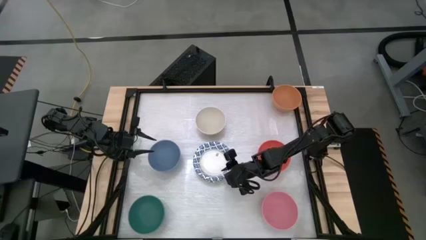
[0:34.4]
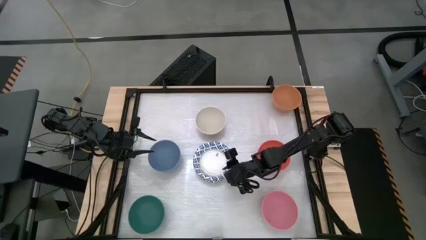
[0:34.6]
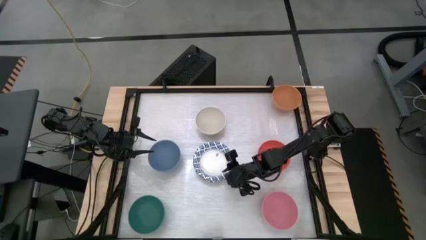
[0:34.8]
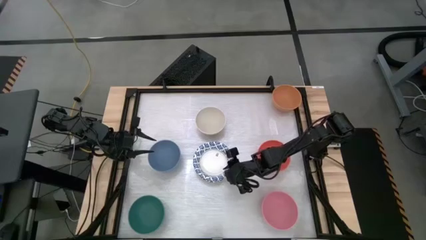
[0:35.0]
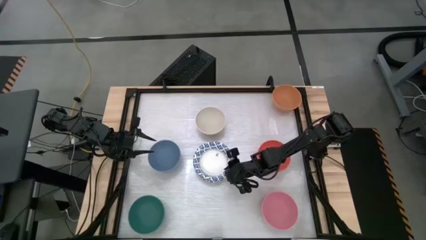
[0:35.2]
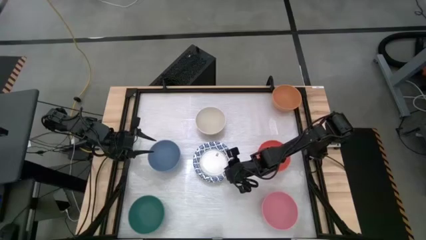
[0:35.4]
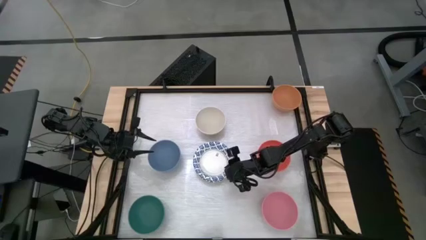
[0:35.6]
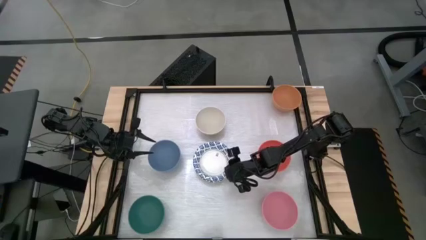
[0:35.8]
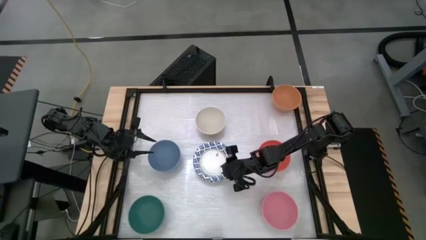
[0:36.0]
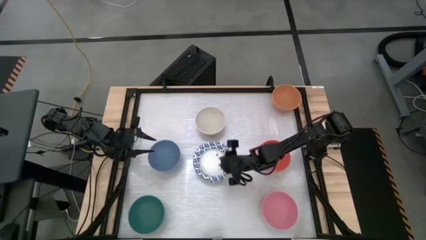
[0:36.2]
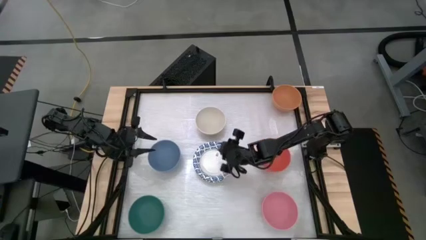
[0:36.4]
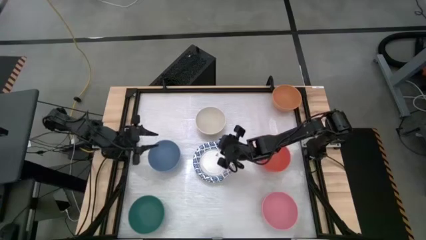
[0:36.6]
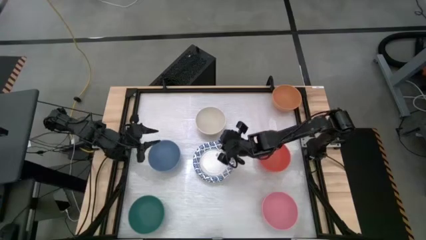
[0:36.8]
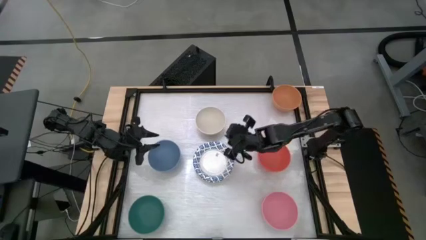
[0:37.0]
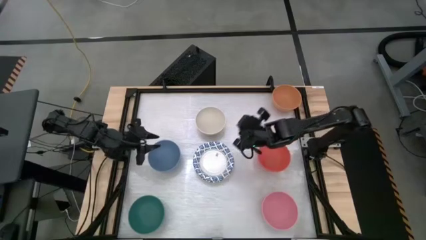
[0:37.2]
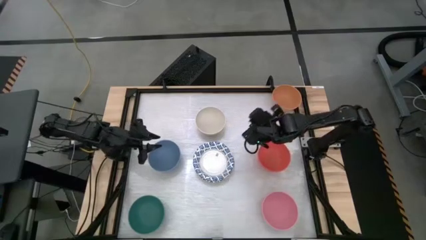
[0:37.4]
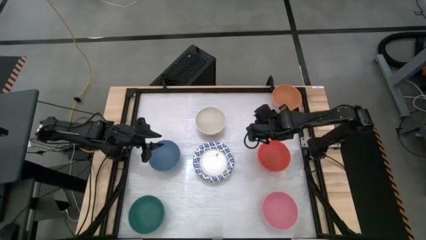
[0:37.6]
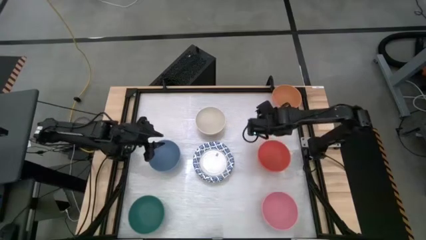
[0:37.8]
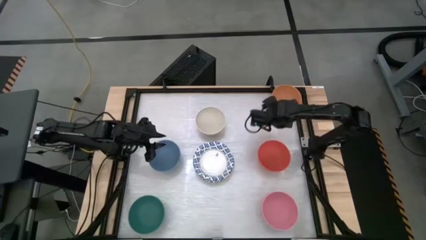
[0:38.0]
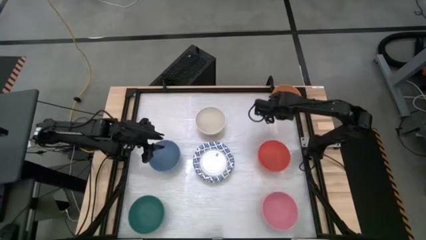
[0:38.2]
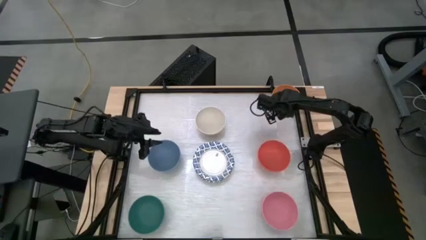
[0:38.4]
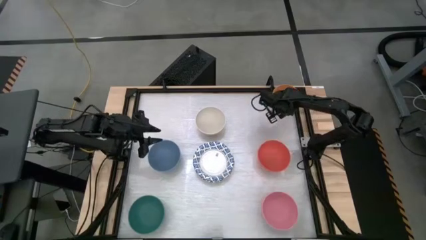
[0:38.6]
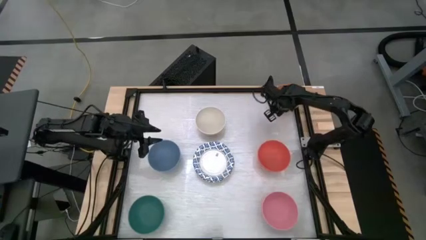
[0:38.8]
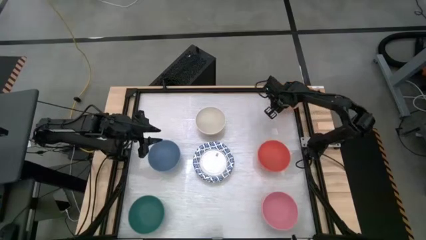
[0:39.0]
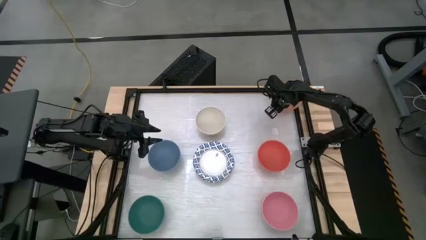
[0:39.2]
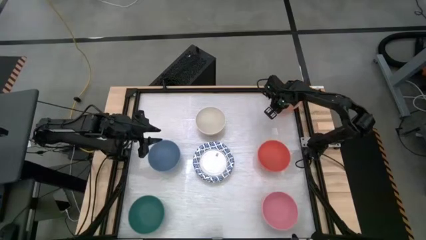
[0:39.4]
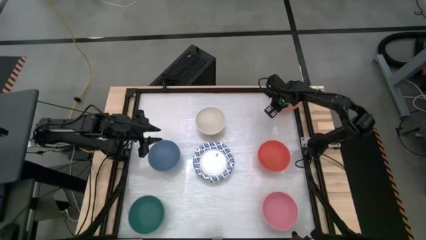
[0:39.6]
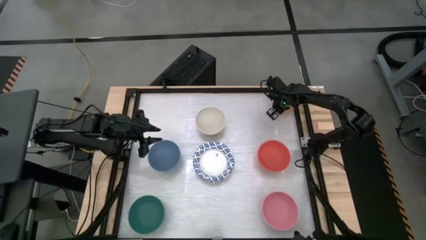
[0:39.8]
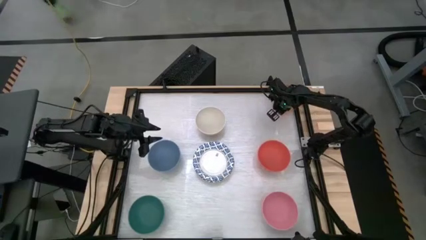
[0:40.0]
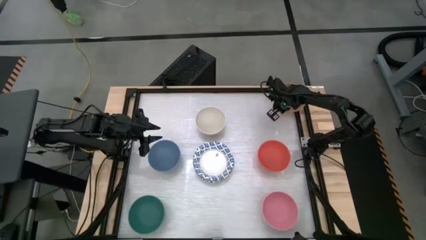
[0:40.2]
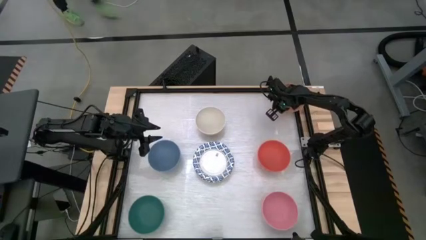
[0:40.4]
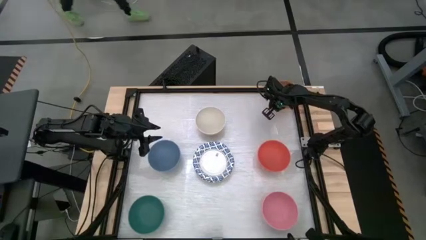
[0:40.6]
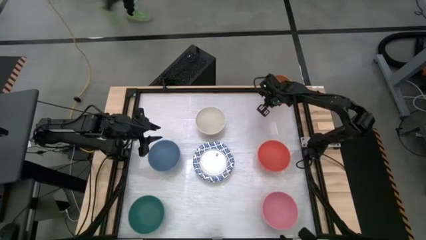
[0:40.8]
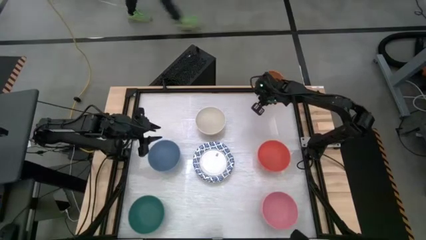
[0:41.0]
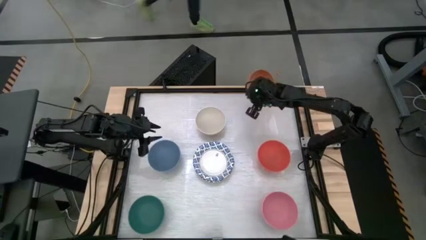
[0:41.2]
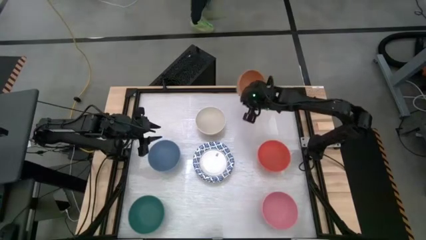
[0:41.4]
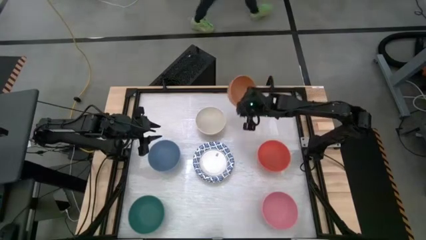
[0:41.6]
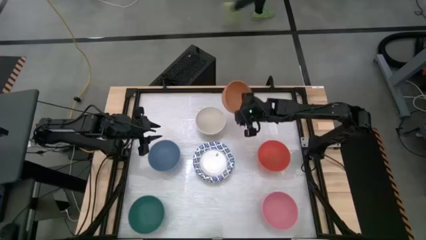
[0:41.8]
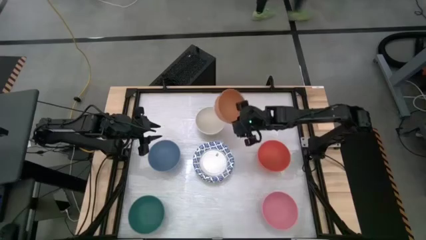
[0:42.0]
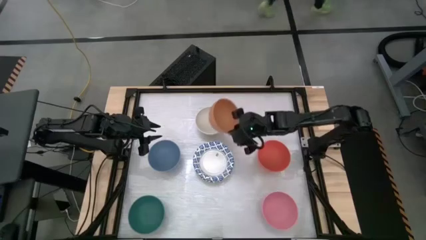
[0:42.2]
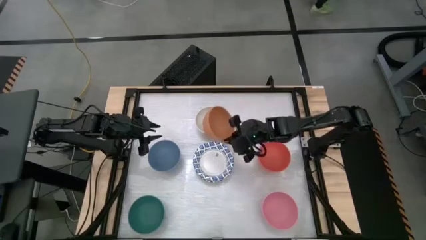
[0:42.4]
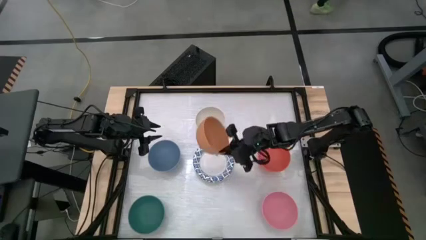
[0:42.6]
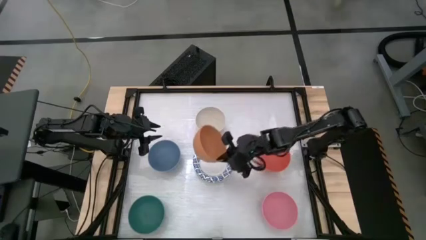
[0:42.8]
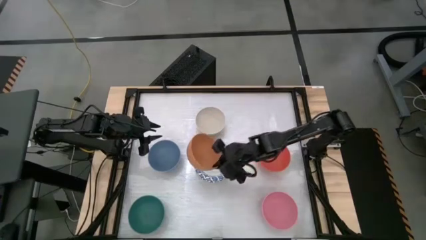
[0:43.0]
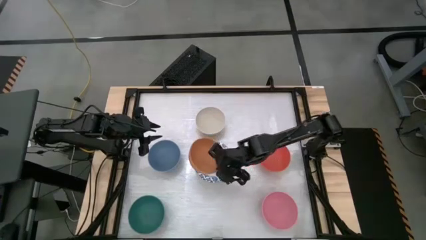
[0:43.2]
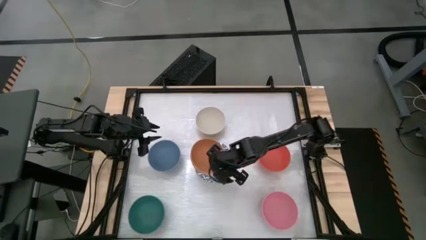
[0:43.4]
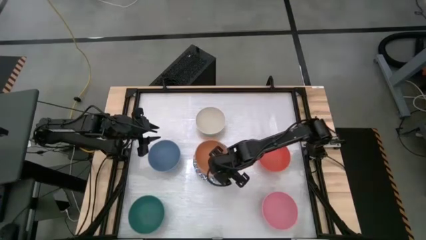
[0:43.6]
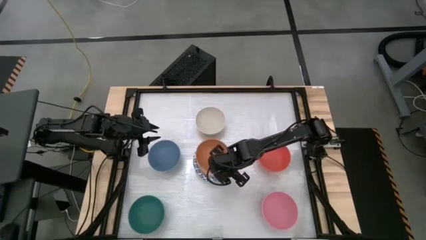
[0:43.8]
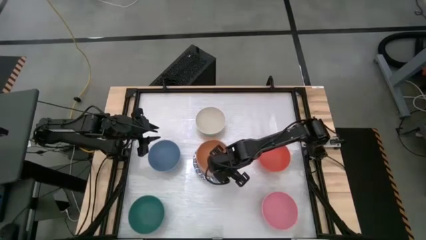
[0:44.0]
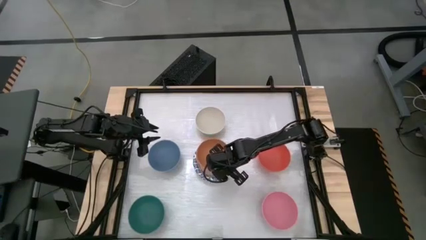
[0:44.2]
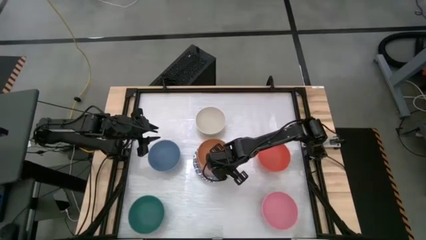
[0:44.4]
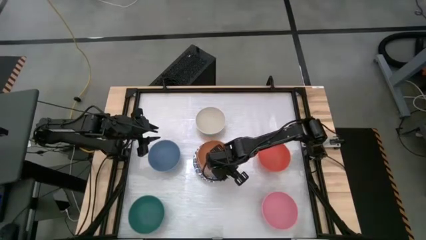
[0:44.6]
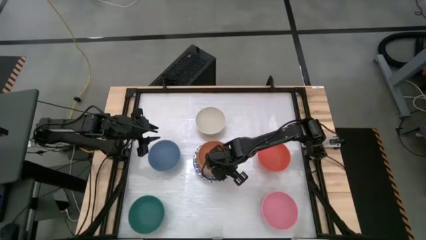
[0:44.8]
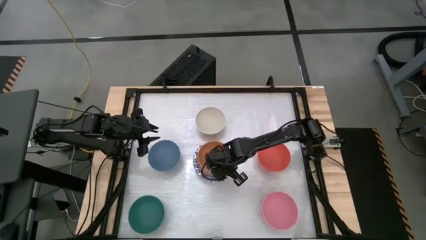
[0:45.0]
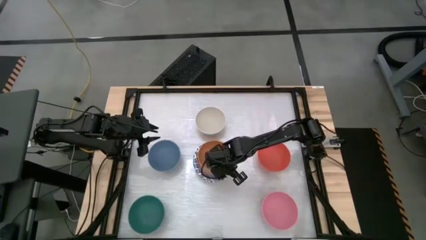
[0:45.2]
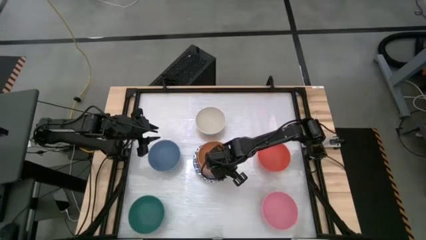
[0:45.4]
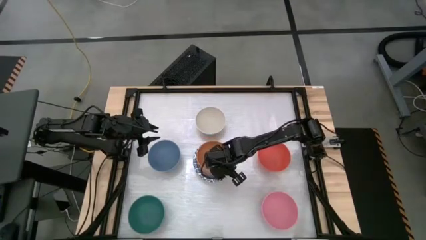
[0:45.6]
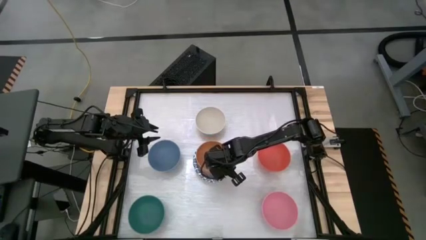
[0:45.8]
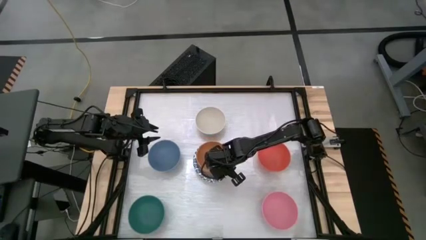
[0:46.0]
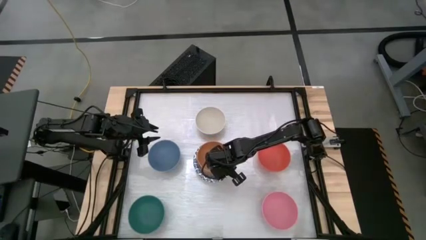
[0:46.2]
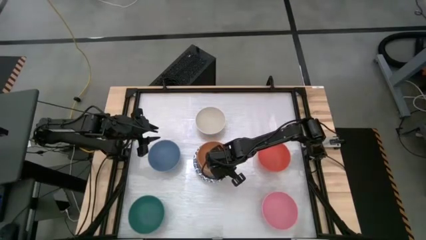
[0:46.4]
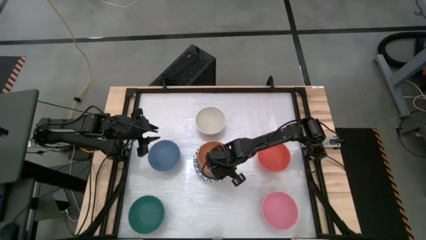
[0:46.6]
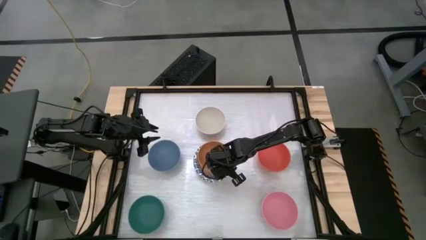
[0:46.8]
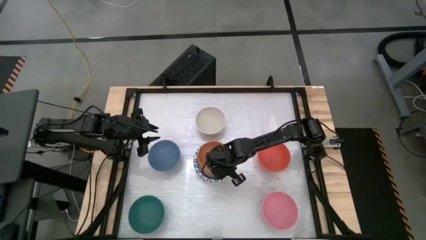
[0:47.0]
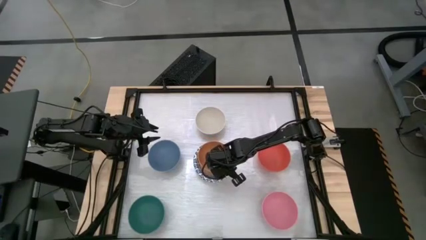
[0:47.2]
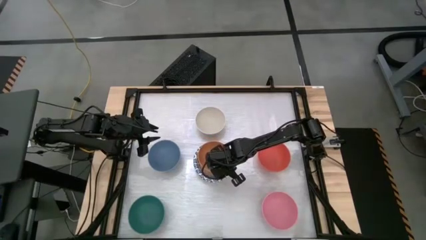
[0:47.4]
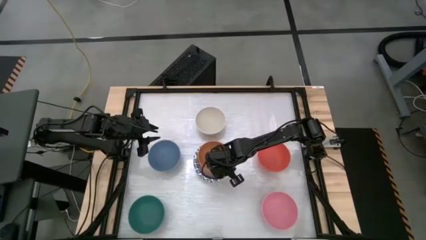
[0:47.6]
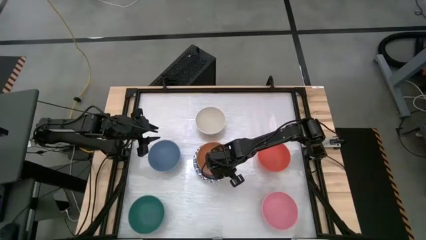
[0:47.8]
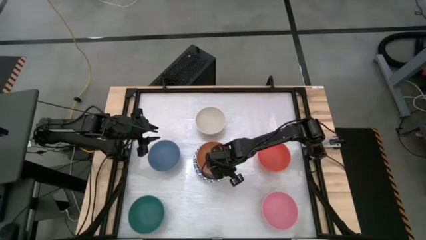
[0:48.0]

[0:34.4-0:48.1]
Task: Nest bowls inside each other by size order
Stack the orange bowl into the white blue bowls
